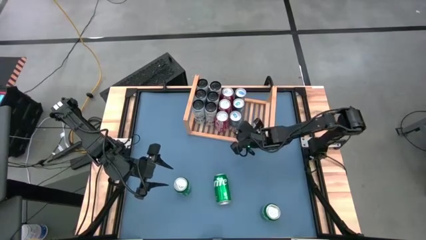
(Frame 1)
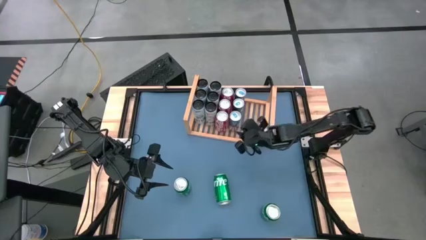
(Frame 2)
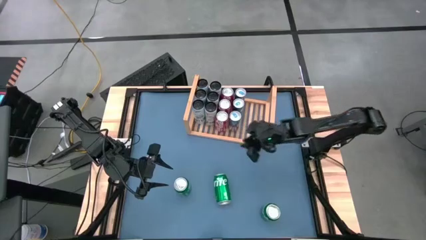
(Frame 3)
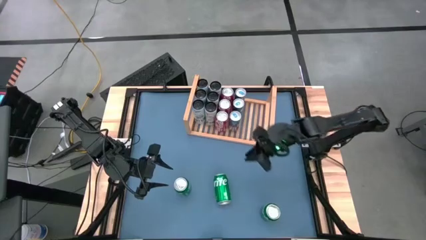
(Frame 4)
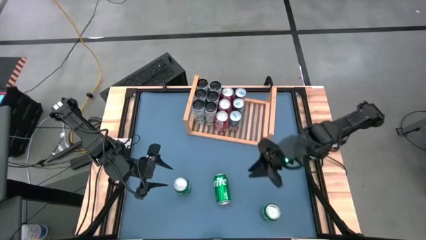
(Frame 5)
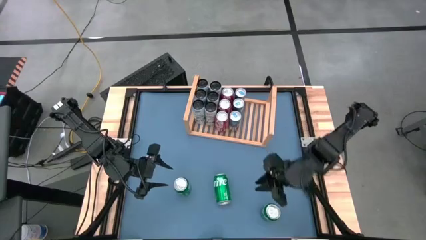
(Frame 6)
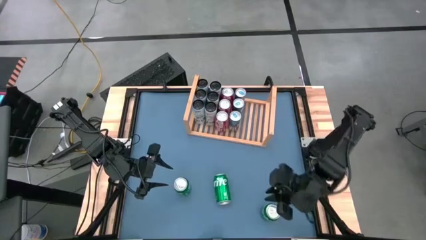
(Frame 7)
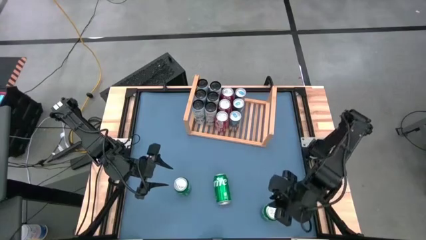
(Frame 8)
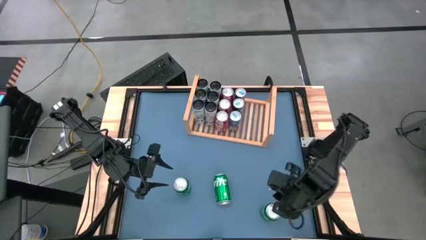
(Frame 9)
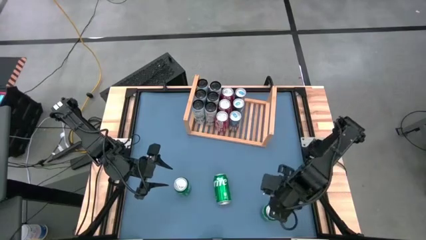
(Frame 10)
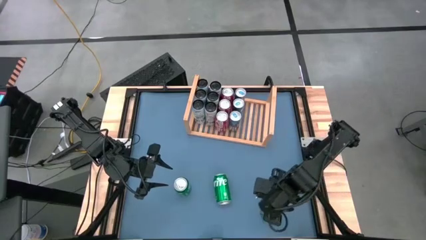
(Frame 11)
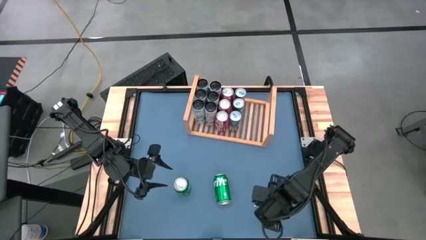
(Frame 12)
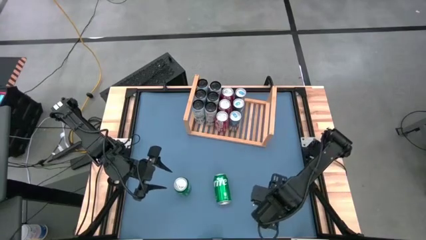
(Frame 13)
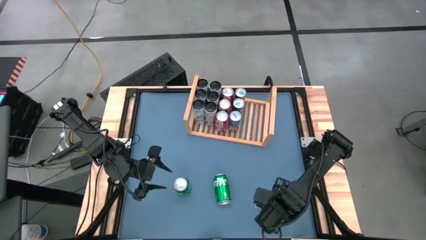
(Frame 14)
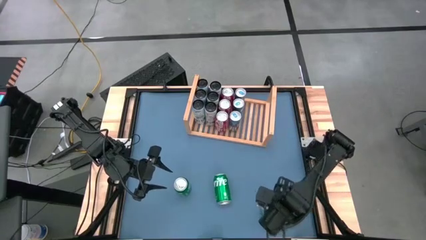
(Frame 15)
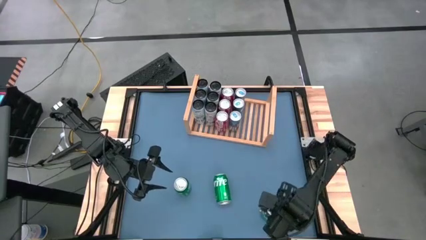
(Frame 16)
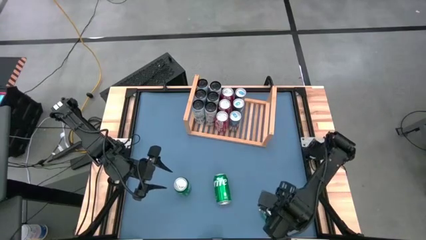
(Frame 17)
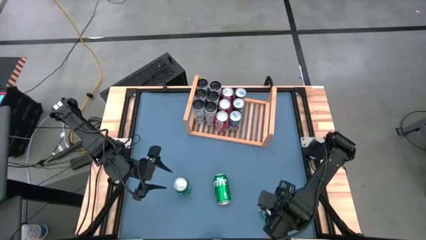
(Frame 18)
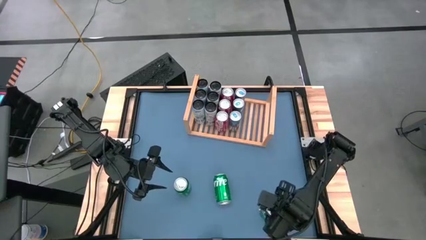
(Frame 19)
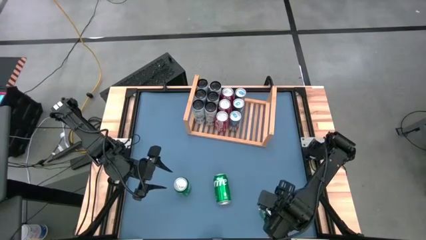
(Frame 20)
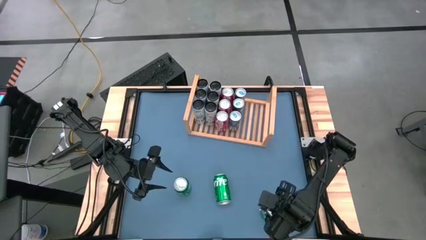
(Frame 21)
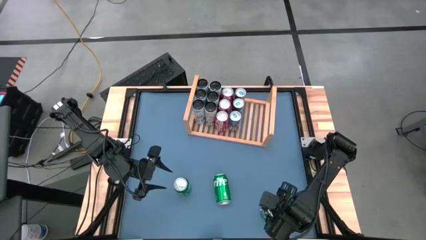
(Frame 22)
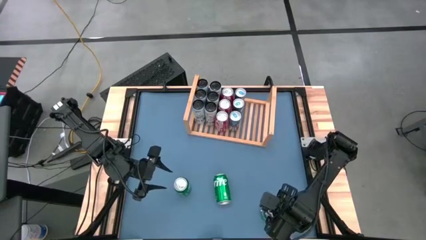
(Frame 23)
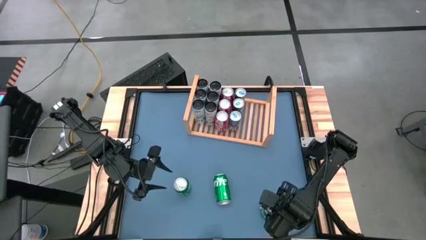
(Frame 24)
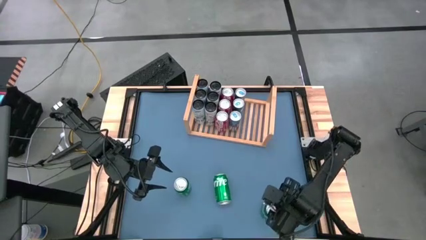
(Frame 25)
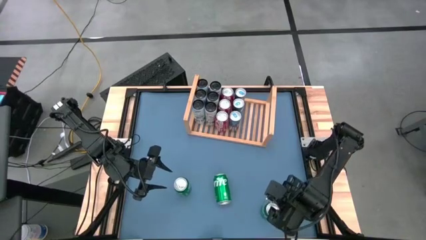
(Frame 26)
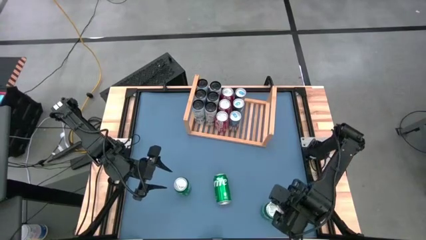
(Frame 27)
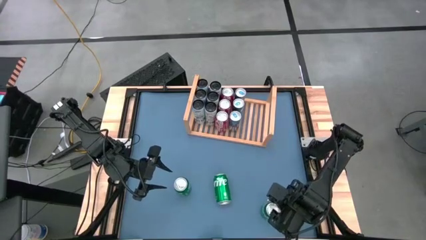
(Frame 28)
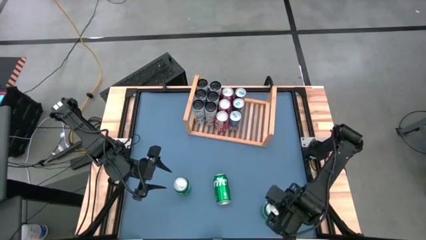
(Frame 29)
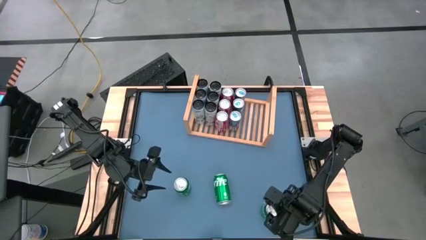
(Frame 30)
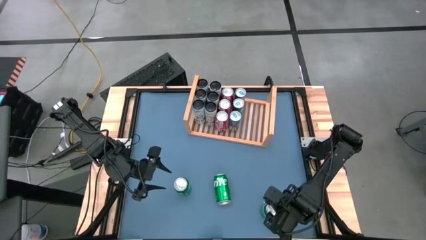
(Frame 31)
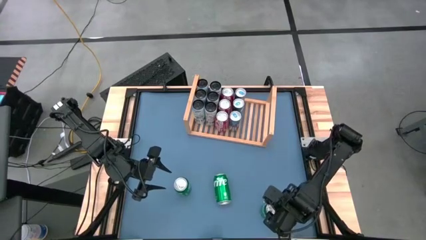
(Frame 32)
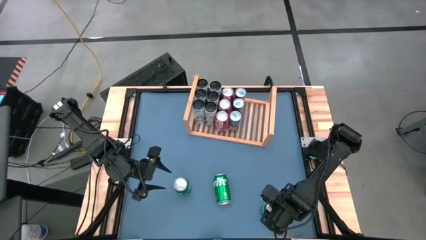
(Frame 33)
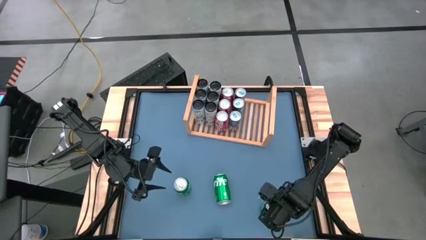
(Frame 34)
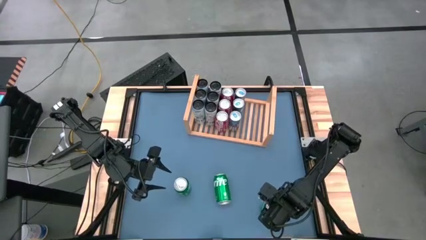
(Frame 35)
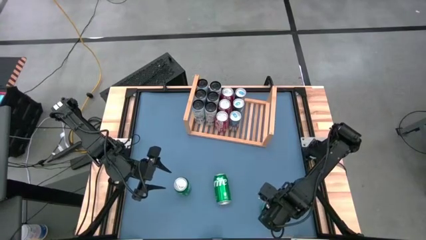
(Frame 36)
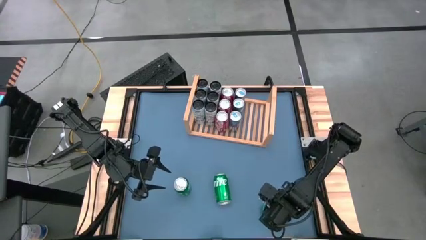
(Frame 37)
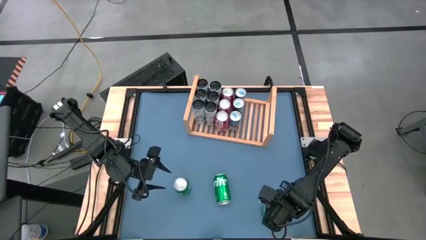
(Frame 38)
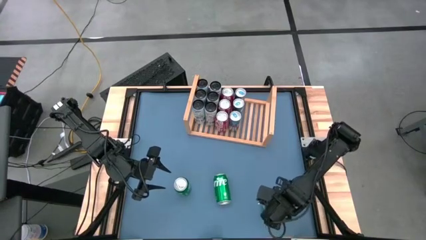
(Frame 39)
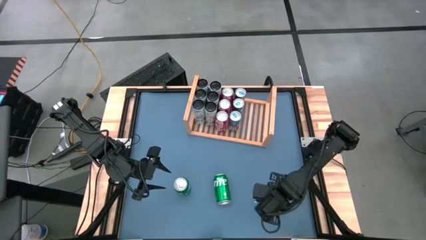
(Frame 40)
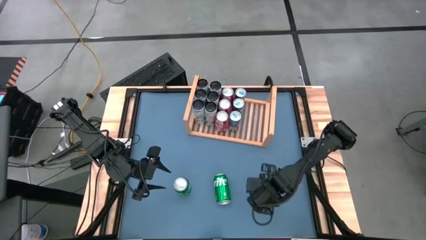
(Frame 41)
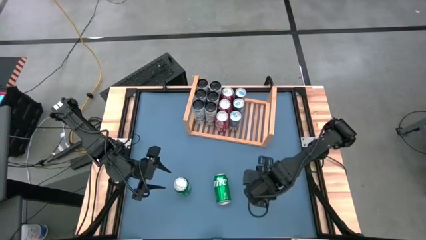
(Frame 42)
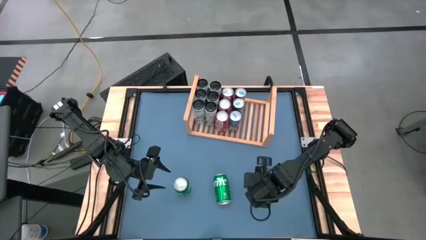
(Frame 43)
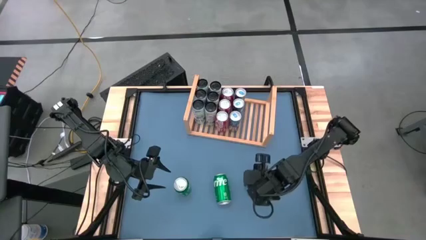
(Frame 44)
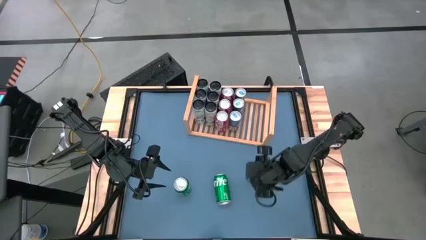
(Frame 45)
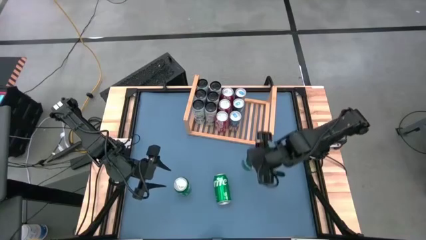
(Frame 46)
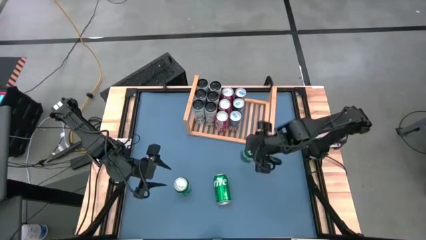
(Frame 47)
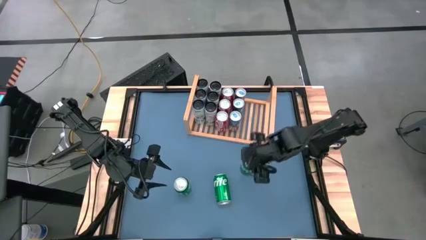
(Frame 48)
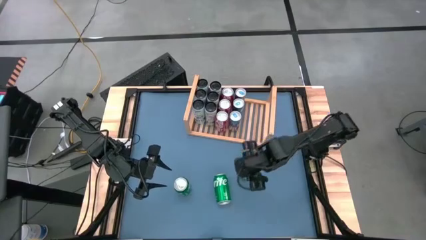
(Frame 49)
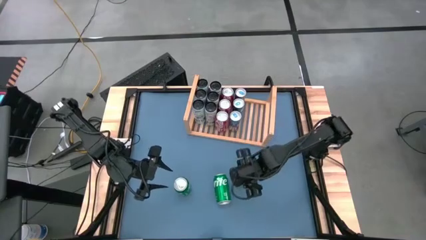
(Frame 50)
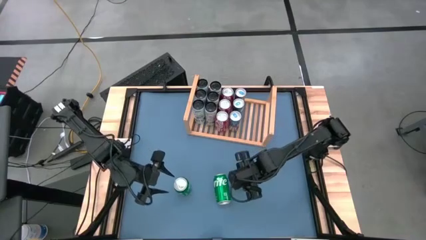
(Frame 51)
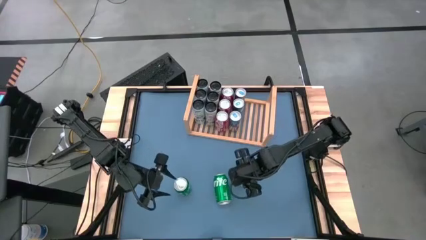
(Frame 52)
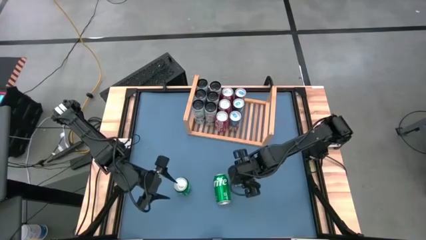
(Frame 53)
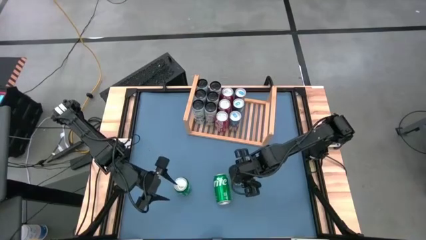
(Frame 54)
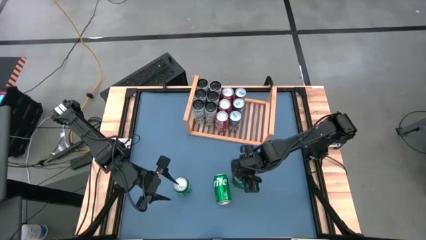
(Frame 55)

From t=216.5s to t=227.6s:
Task: Place canned beverage on shelf
Put the green soda can on the shelf

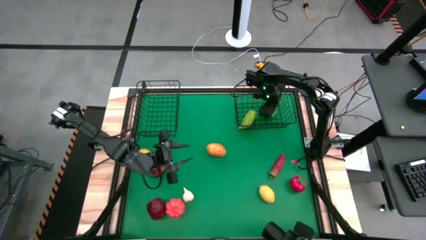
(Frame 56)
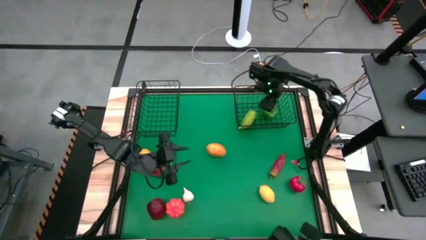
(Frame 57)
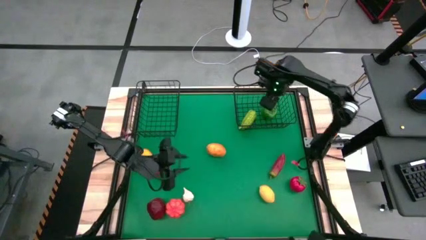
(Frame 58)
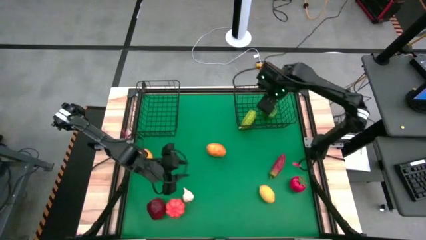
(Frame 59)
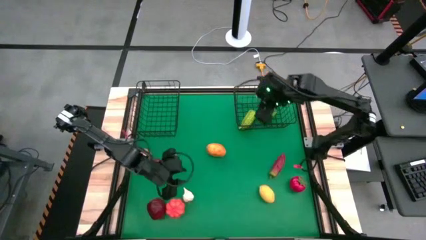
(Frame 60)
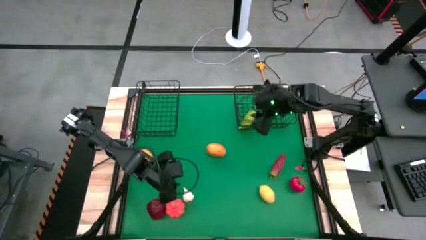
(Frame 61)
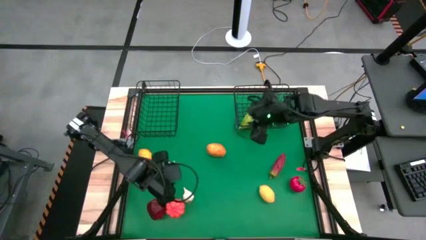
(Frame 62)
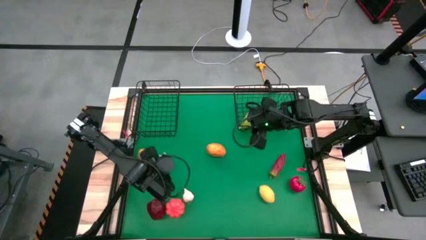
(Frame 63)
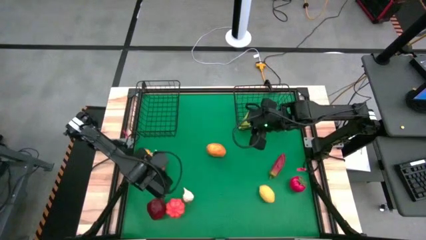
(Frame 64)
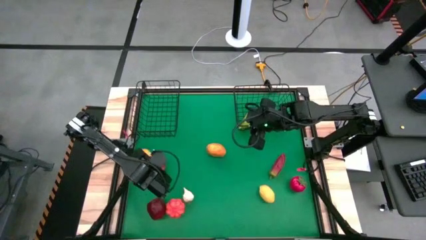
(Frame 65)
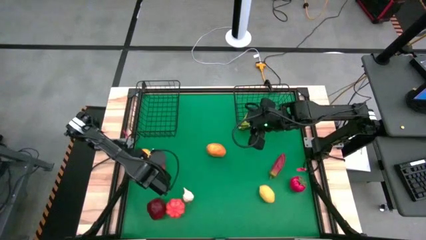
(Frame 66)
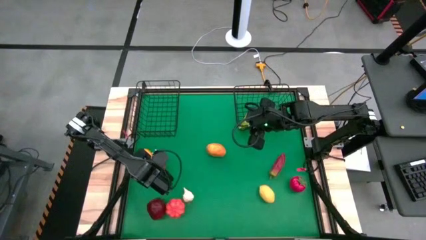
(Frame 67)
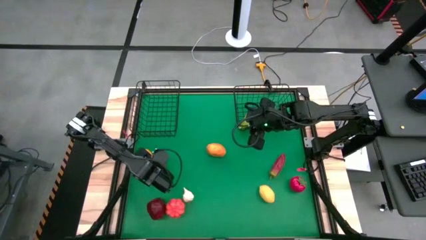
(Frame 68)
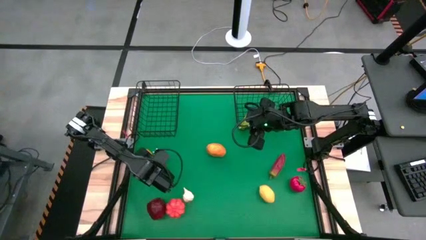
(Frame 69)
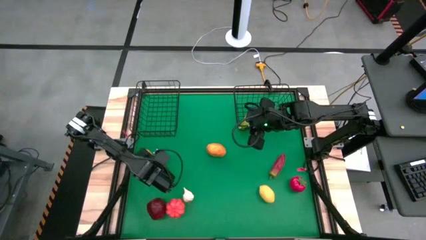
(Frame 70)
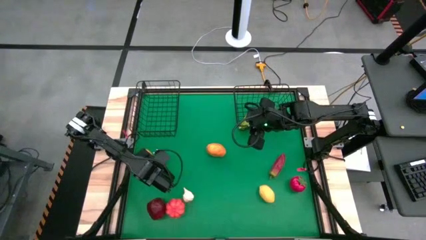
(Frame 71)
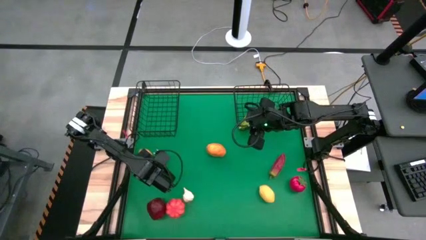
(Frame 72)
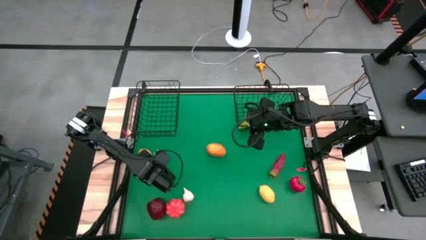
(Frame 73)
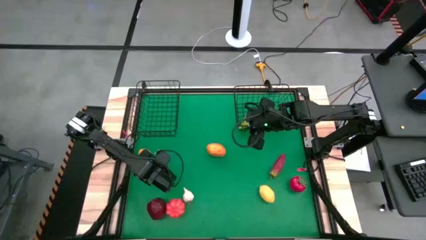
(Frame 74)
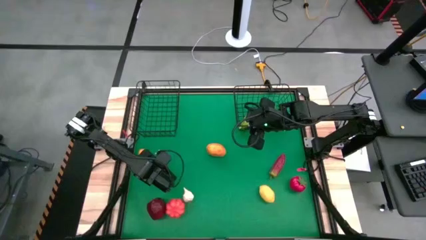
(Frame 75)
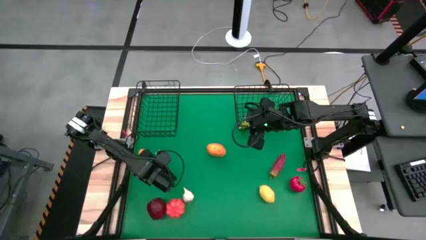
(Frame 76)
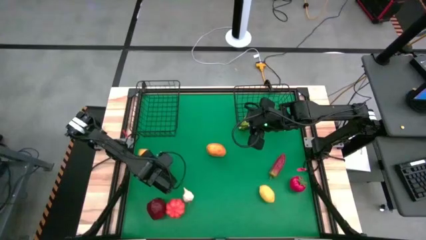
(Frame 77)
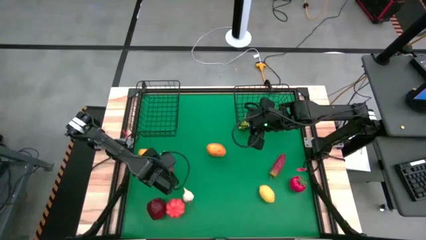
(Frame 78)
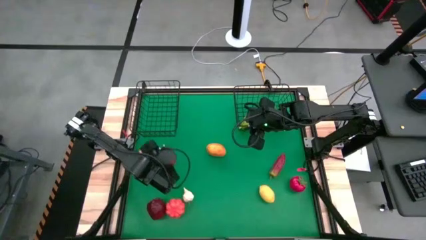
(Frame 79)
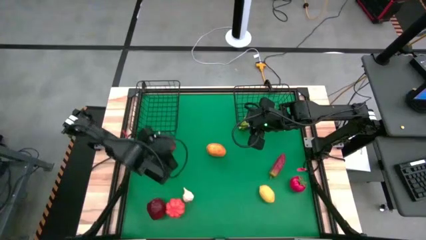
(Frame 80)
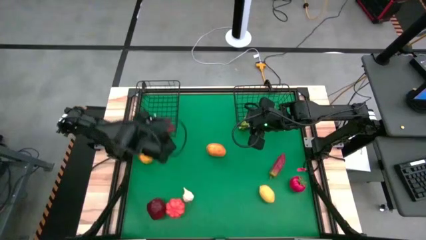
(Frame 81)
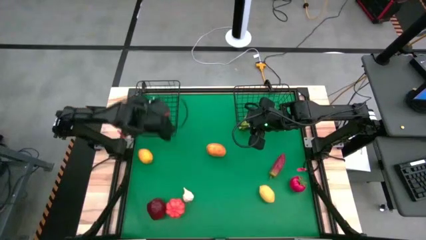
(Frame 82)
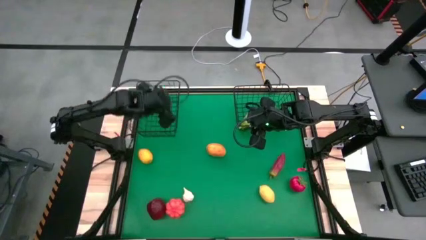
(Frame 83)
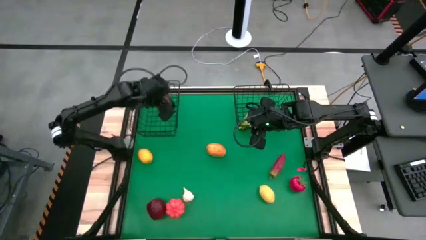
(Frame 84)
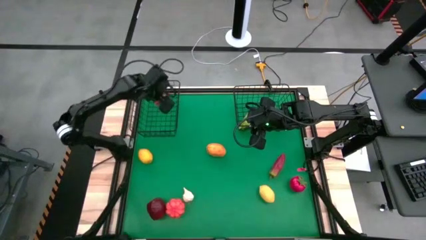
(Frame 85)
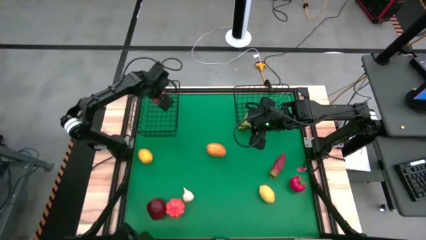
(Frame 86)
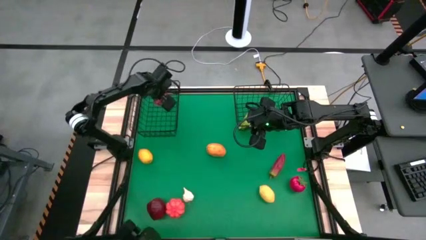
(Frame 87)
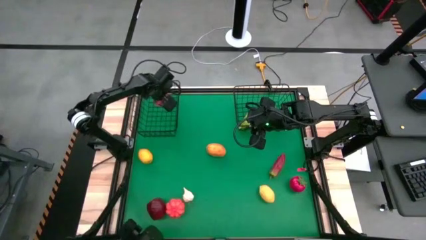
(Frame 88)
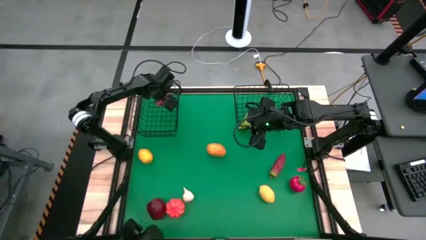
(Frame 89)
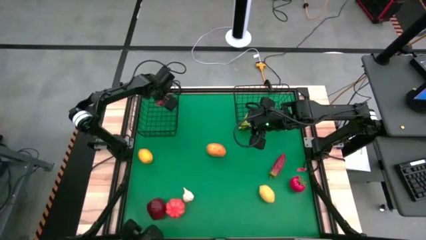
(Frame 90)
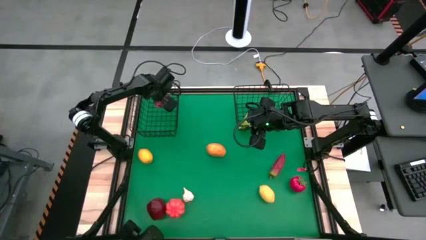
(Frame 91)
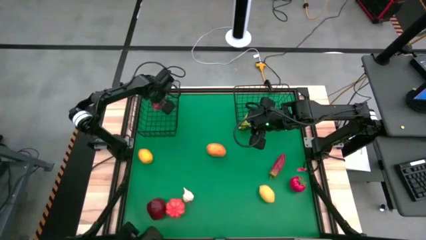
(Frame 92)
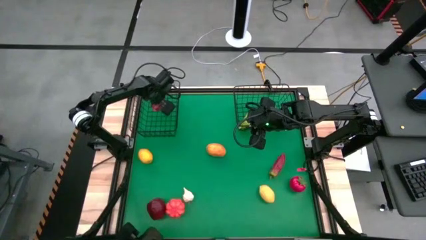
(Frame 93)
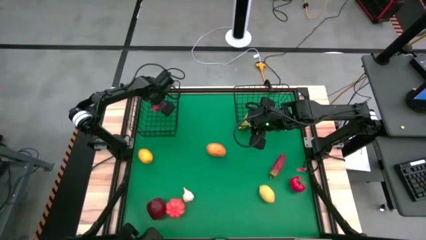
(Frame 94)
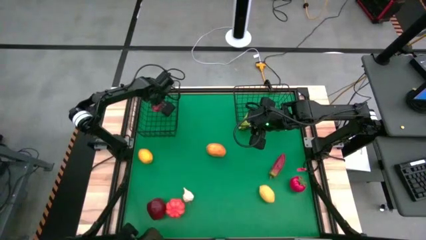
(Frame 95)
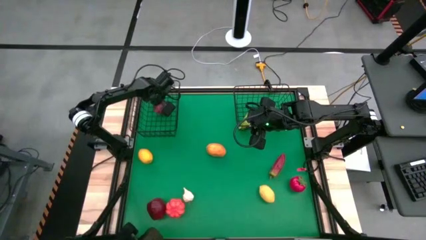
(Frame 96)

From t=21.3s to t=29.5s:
Task: Sort produce into baskets
Put the top red apple into the left wire basket
